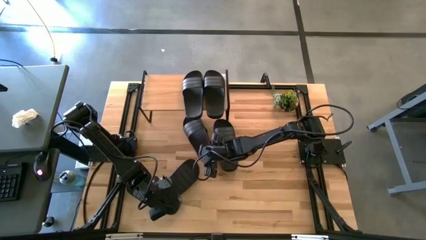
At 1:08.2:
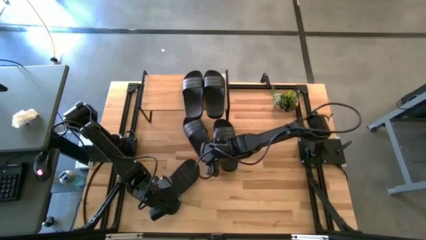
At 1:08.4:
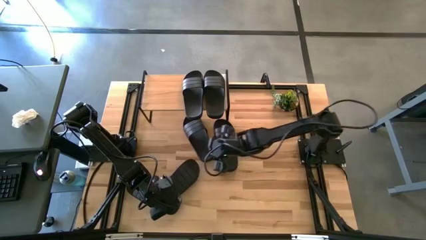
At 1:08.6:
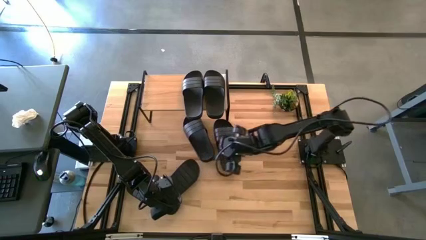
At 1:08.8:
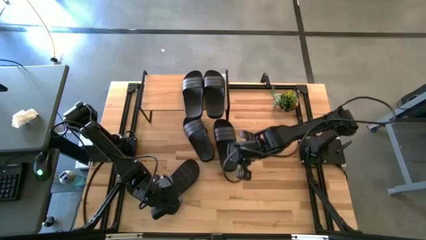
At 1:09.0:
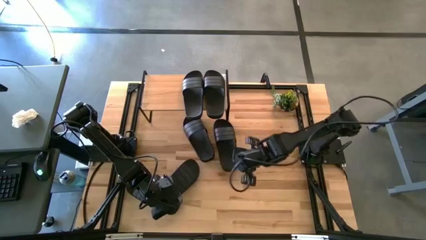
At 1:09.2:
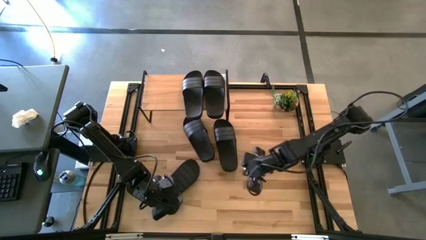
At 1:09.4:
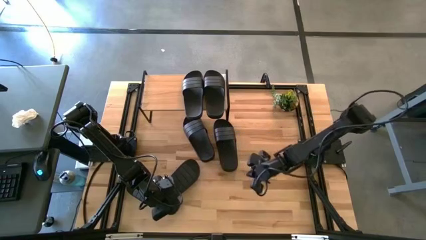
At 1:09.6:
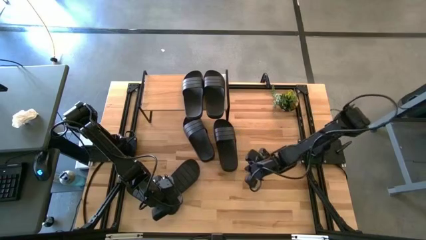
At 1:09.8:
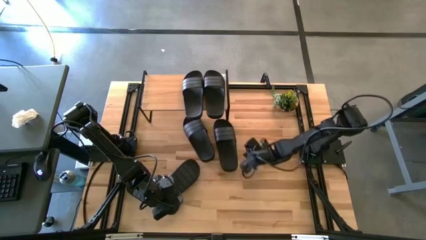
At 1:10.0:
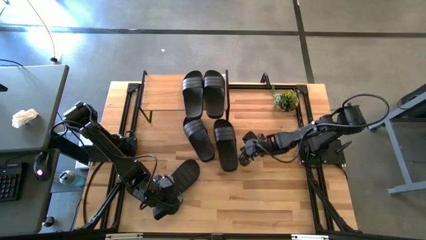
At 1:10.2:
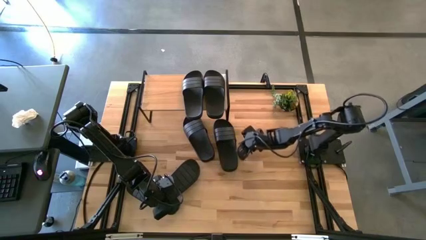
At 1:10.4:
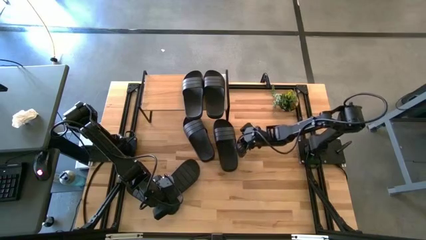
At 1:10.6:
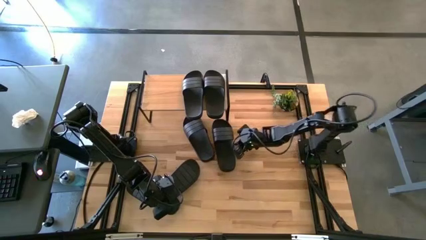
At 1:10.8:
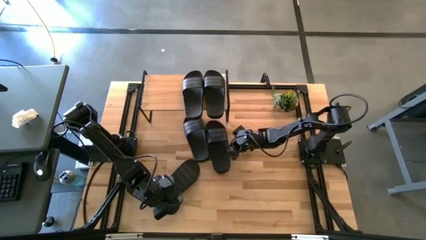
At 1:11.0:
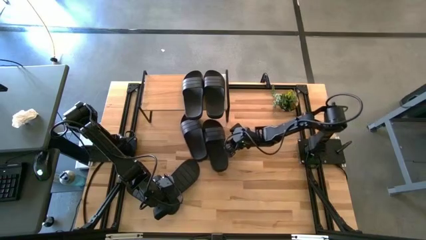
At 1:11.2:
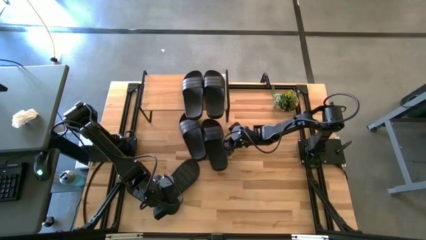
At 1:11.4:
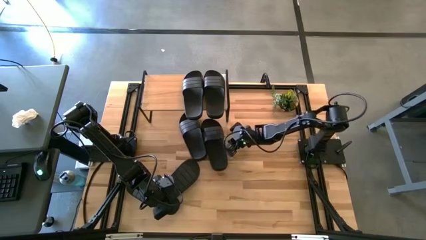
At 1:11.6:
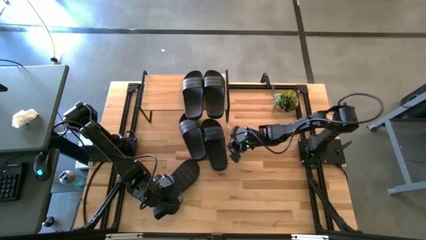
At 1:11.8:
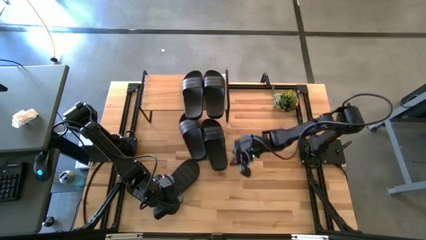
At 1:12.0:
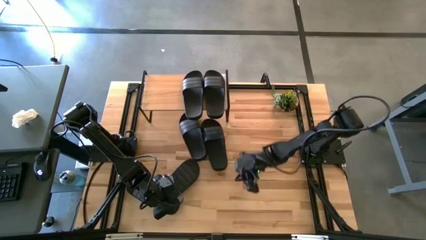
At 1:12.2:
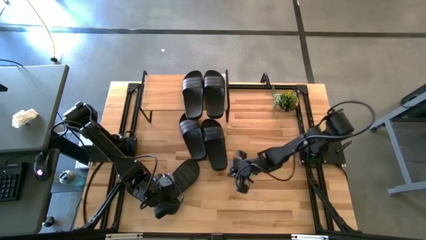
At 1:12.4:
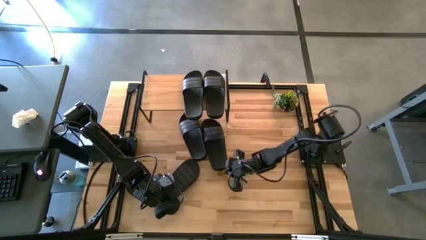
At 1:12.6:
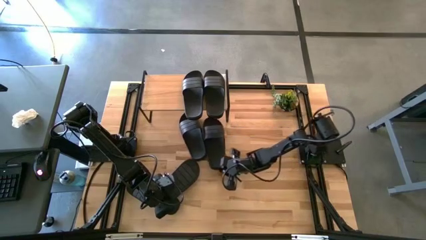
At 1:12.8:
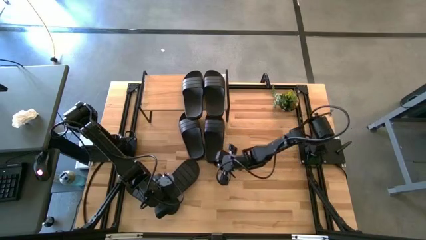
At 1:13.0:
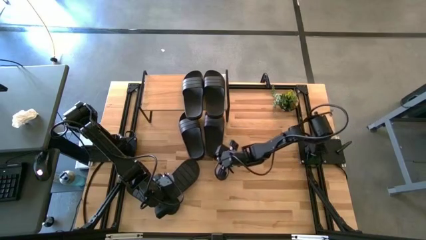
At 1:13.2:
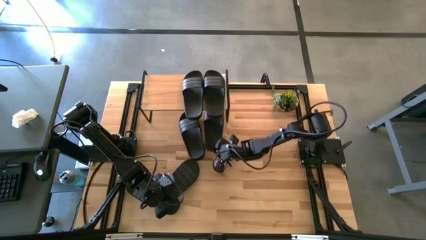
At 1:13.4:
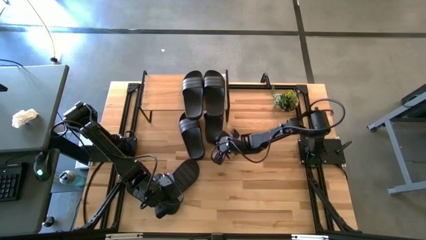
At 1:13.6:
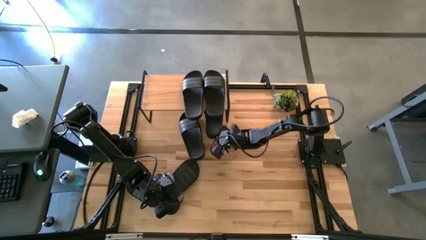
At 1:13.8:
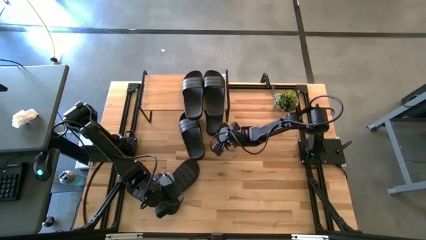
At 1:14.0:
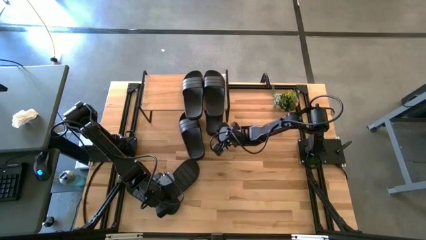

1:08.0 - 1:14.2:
Task: Pick and place slides into the shelf
Adjust the black slipper under the shelf

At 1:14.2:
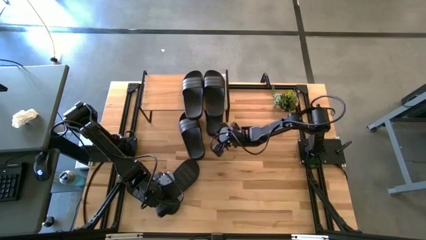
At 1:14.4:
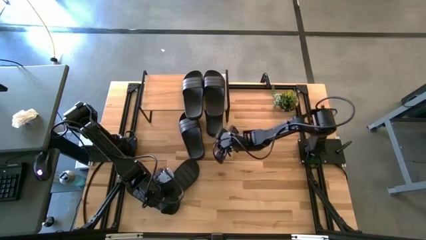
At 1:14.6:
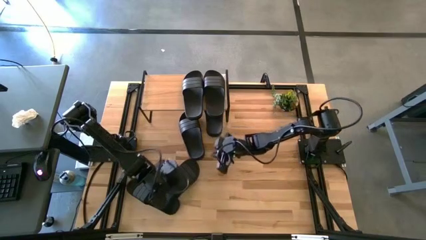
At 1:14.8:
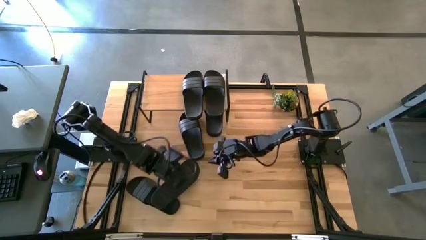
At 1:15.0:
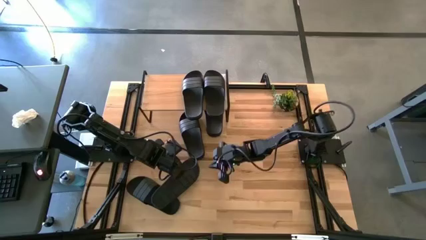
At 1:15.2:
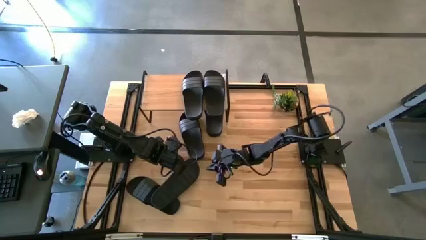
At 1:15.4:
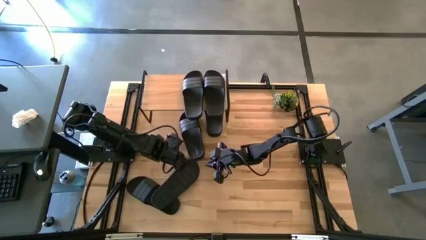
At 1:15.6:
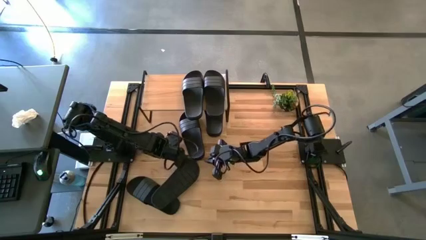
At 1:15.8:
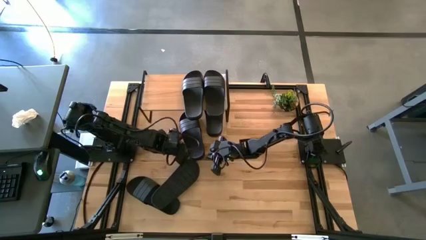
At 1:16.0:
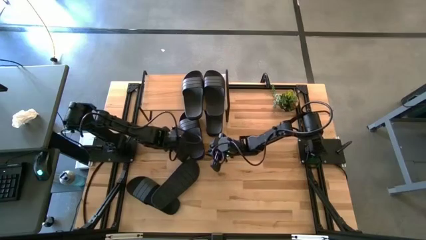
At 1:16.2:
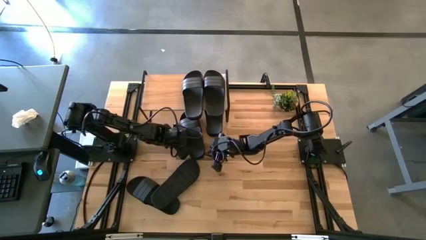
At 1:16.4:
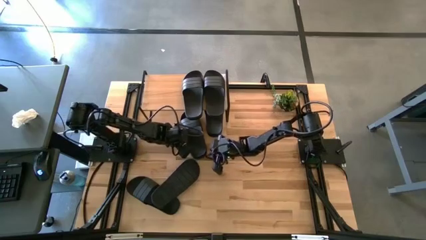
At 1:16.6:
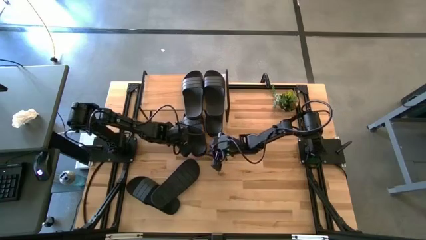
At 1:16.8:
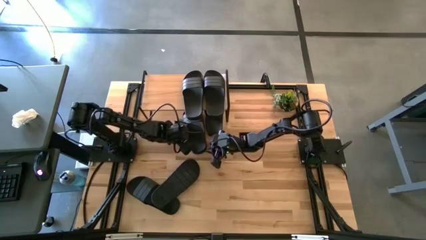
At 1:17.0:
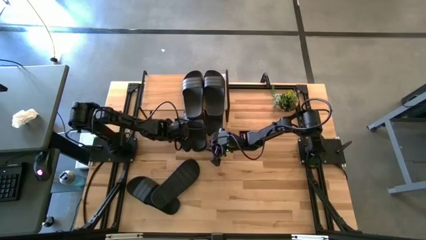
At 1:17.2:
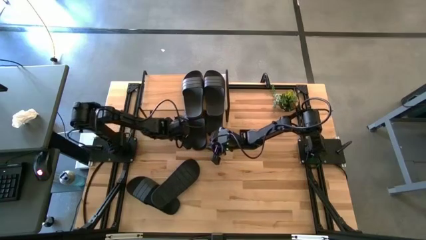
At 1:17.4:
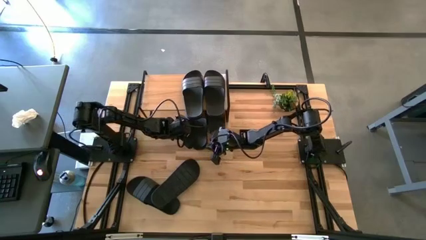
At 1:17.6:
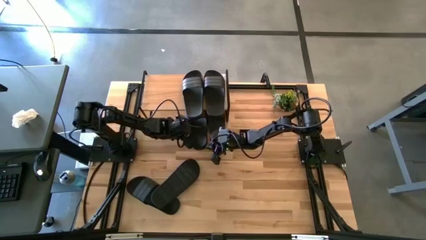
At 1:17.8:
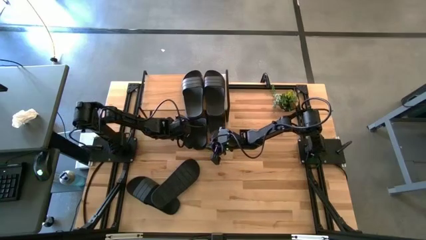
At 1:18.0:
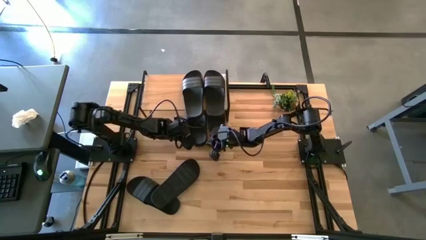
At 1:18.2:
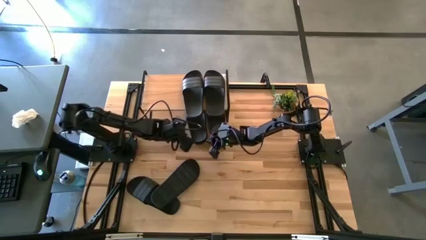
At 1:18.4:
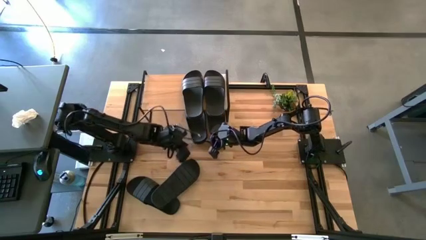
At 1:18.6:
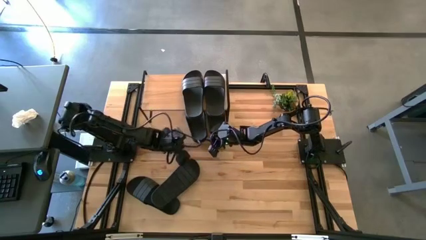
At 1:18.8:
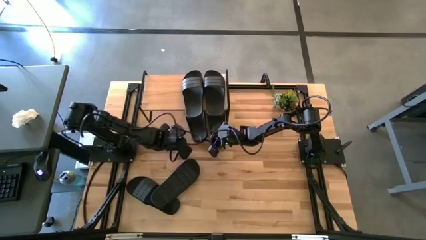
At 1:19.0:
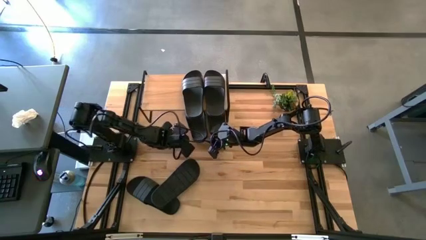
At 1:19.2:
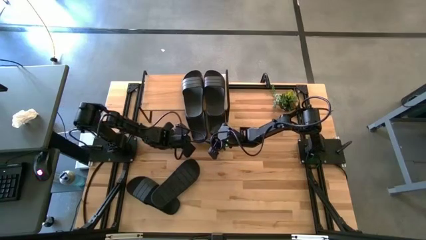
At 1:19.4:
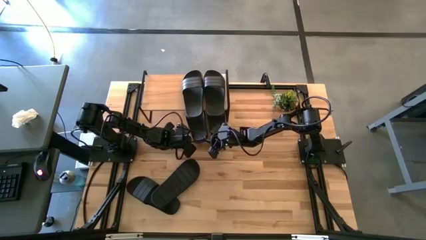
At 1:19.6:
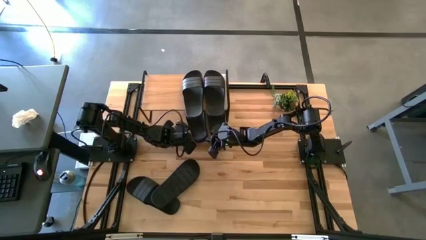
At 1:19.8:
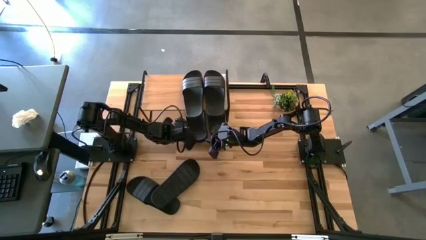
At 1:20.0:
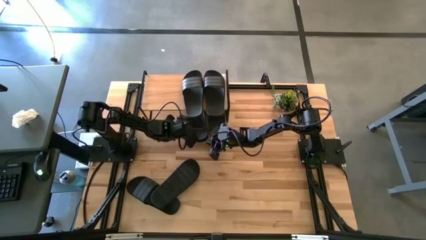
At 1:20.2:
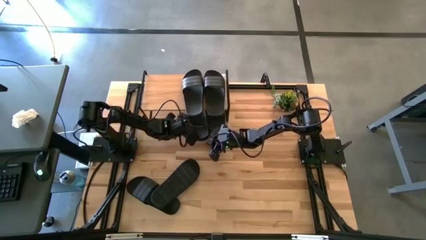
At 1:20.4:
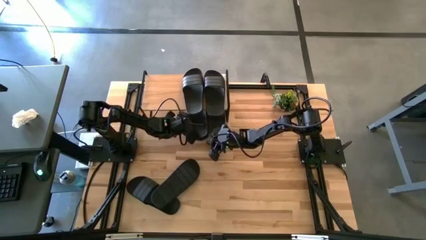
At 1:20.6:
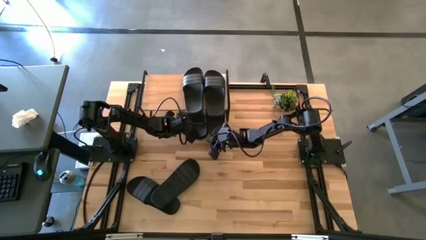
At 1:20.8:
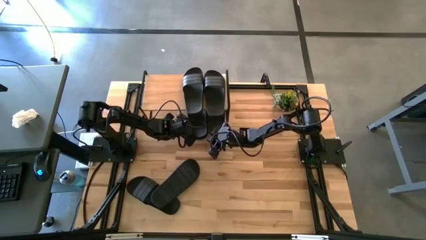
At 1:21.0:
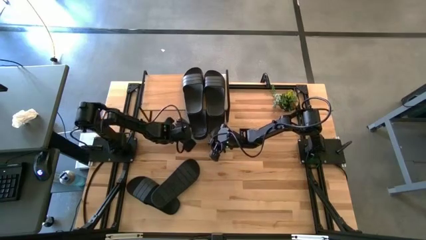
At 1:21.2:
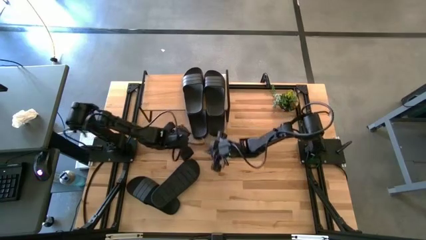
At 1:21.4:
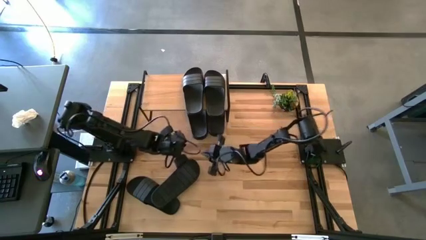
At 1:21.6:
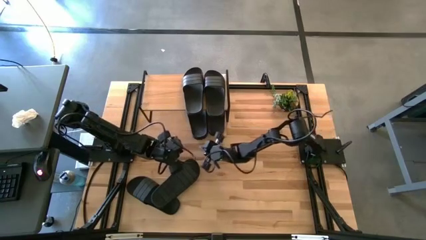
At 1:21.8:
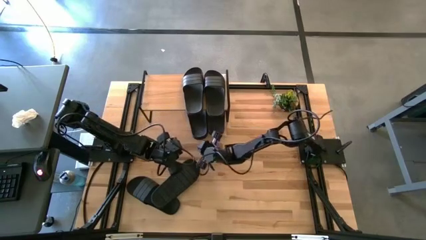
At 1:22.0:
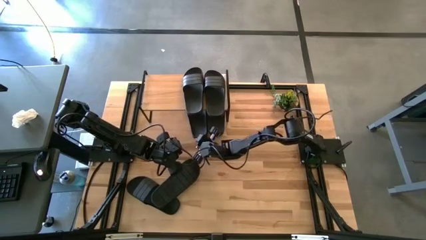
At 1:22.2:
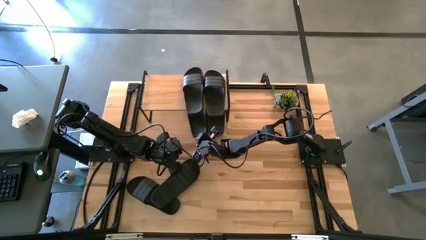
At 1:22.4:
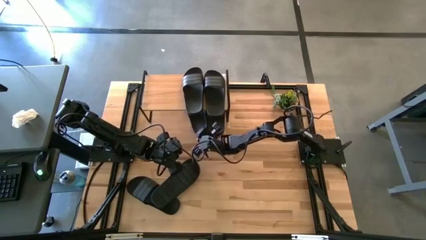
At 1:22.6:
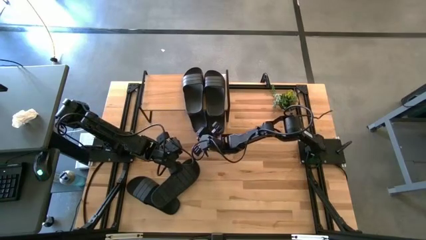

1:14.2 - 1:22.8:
Adjust the black slipper under the shelf

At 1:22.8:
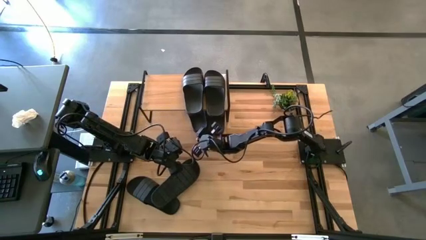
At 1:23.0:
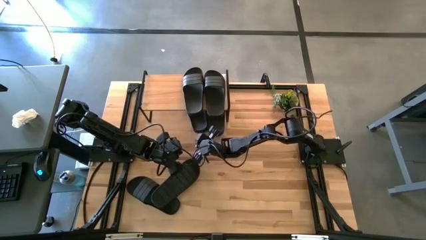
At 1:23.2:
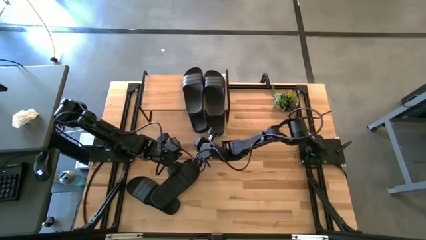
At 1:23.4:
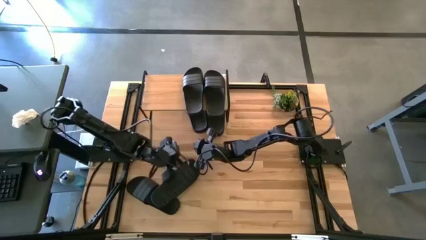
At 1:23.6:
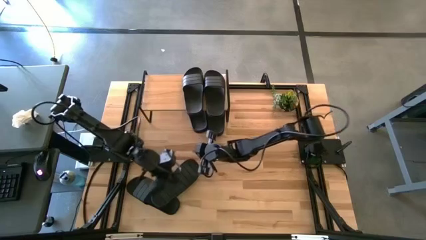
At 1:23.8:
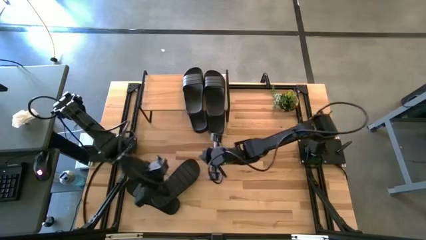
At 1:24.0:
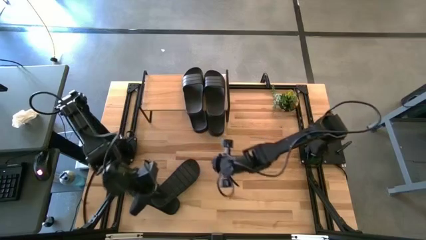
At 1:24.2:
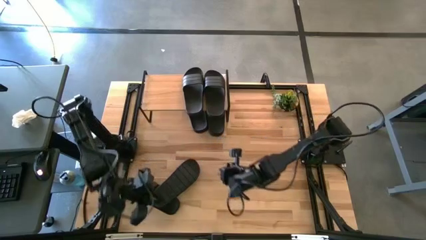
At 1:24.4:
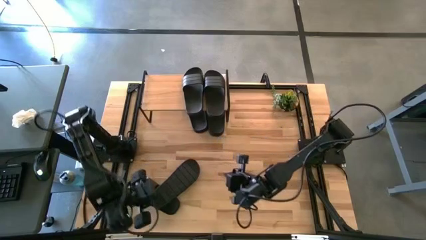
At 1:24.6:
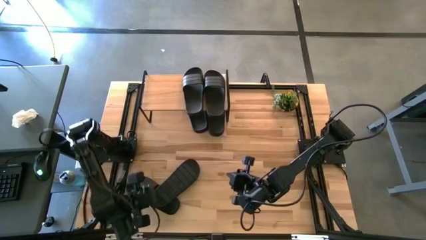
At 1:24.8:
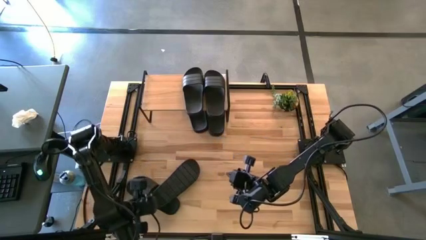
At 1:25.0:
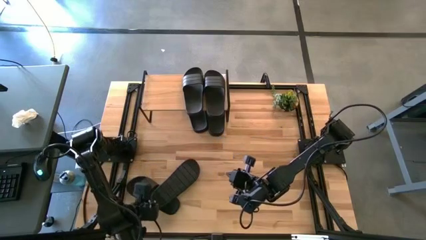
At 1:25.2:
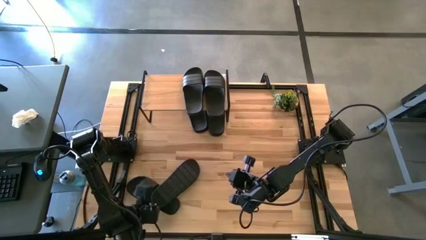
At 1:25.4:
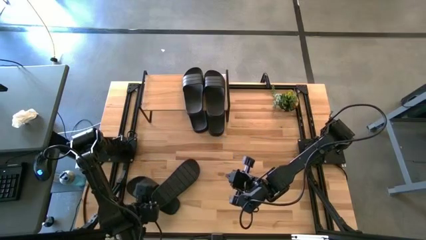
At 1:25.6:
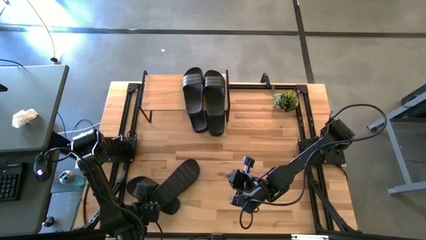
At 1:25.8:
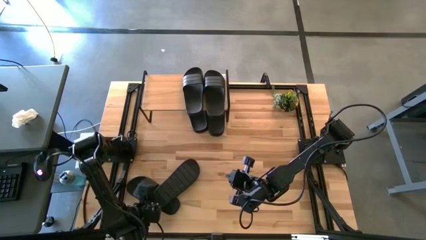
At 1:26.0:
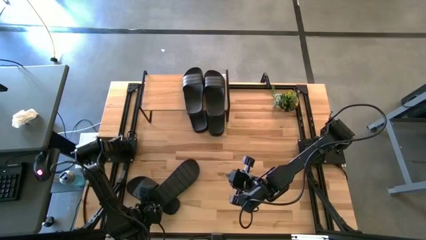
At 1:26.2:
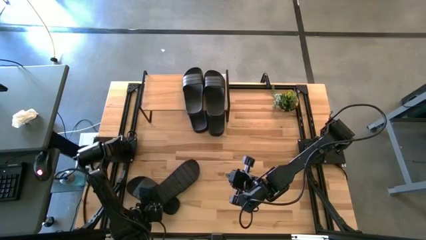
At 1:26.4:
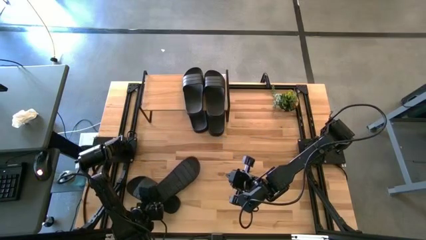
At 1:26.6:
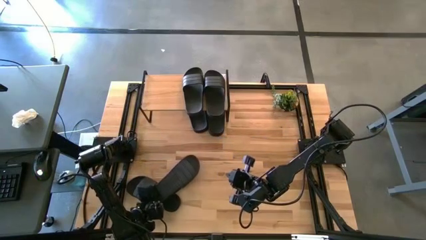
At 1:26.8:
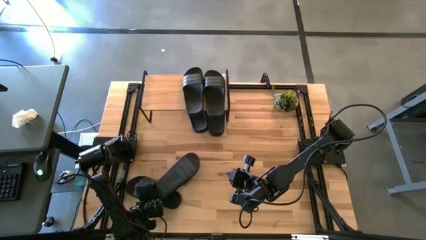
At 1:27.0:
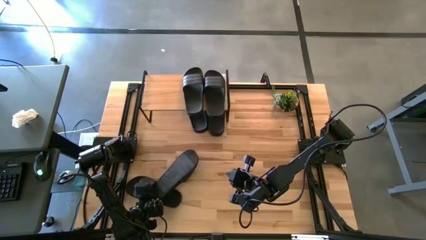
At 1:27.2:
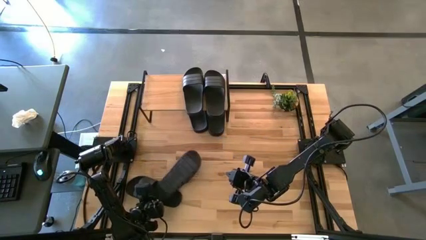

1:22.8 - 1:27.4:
Put the black slipper under the shelf
